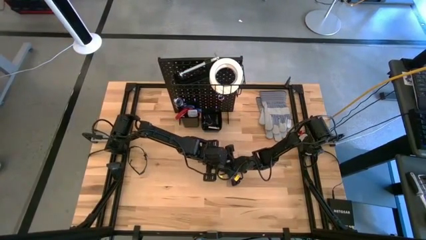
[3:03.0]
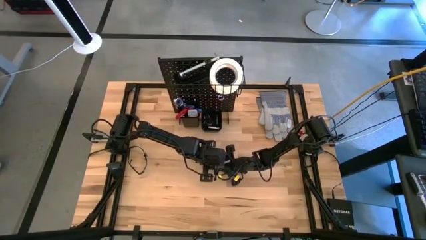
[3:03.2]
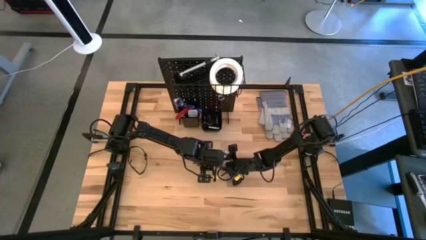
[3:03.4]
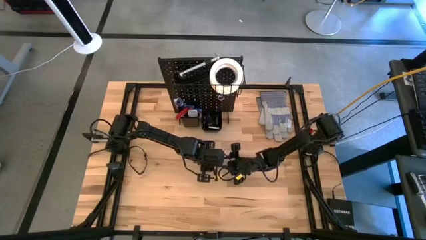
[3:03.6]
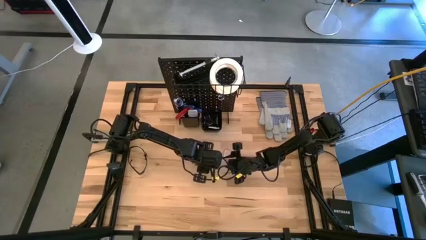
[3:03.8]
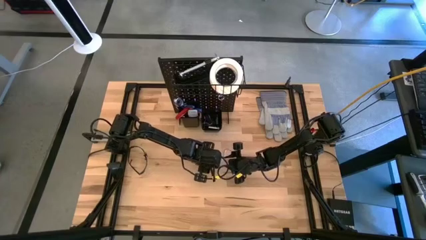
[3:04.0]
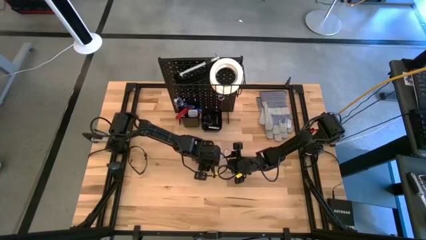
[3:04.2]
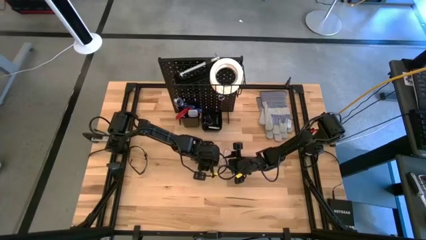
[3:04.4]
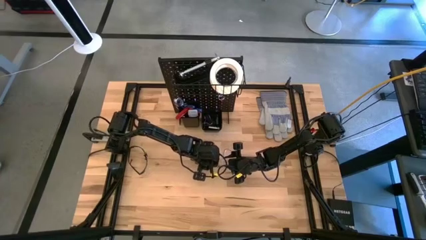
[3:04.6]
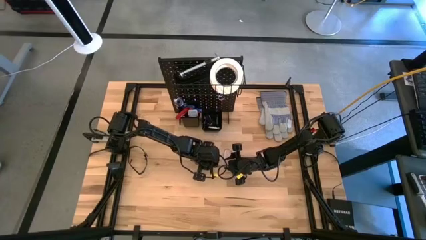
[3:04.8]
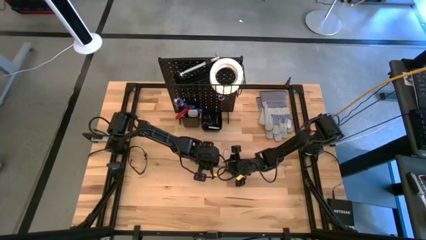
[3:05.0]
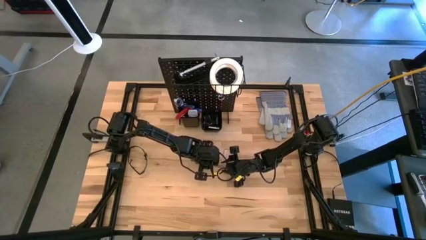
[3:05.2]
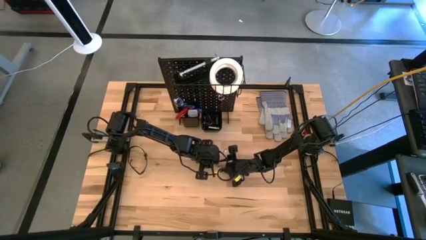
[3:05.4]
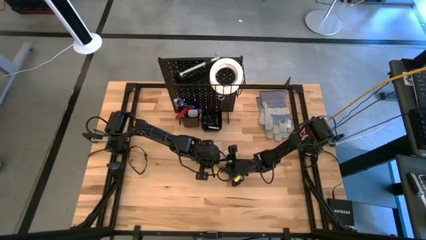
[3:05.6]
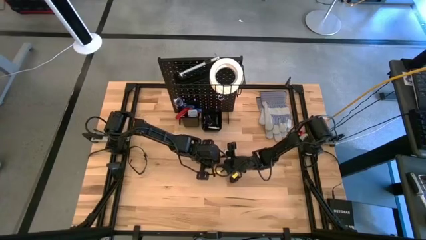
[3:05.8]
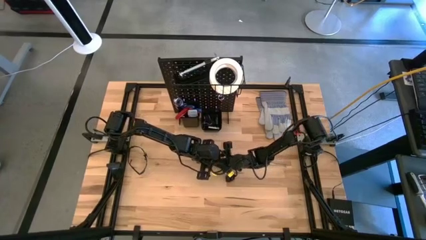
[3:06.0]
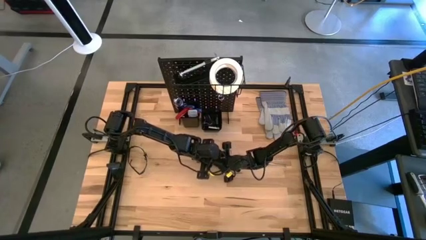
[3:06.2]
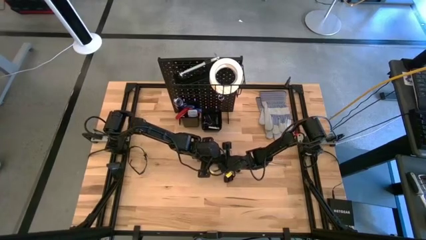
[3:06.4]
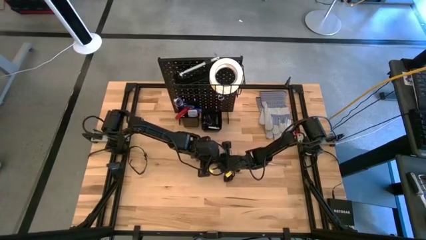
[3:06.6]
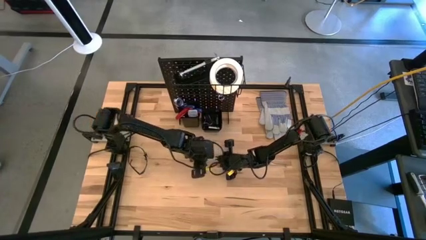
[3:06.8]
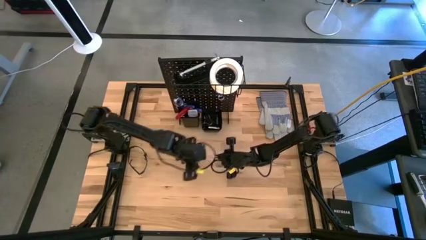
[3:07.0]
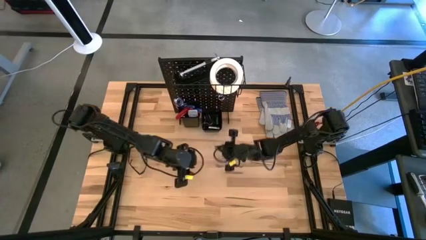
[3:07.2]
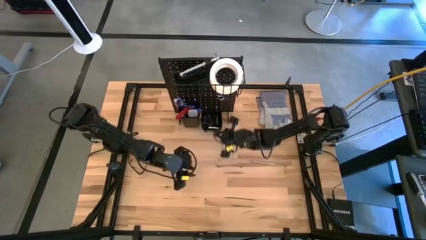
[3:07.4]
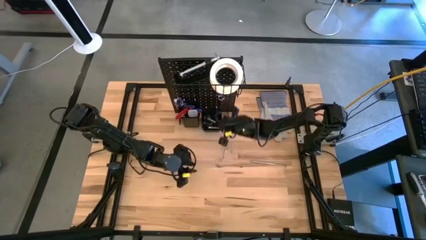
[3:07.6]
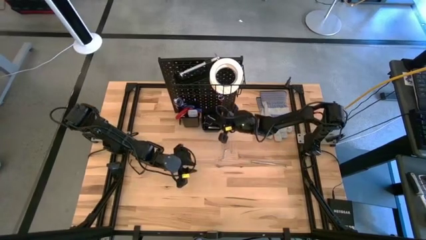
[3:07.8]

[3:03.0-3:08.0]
Task: Hang tools onto peg board
Put the pegboard hook into the right bin on the pegboard

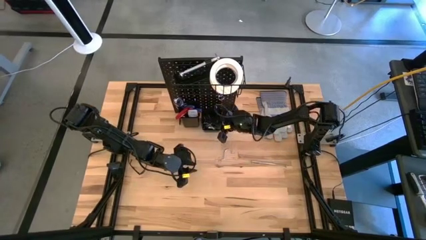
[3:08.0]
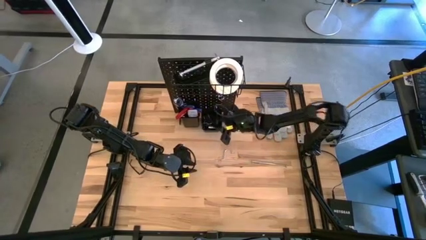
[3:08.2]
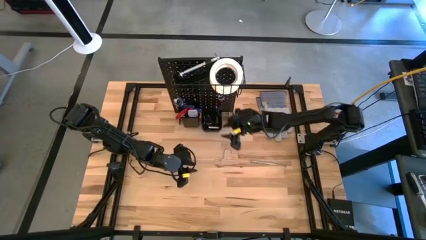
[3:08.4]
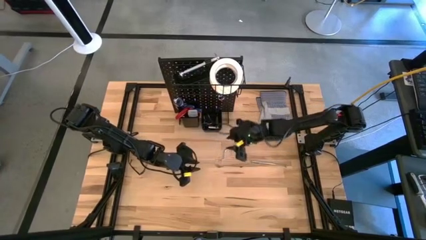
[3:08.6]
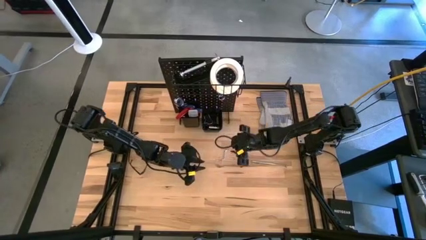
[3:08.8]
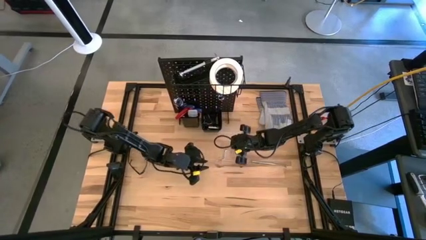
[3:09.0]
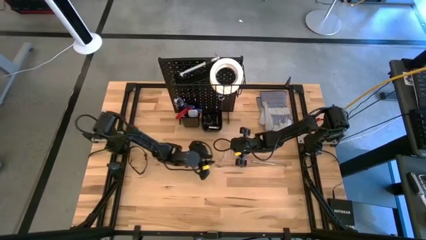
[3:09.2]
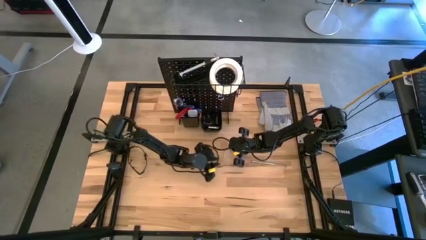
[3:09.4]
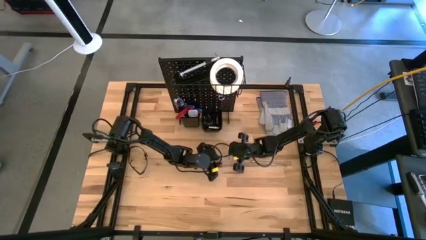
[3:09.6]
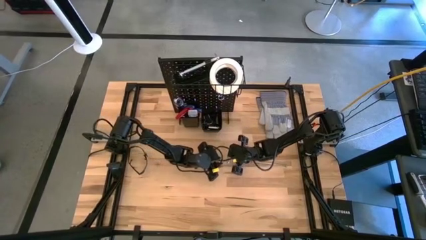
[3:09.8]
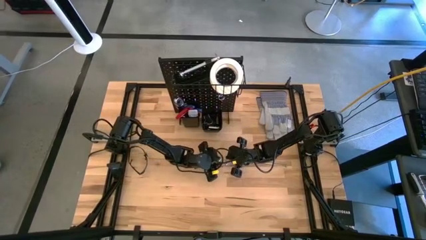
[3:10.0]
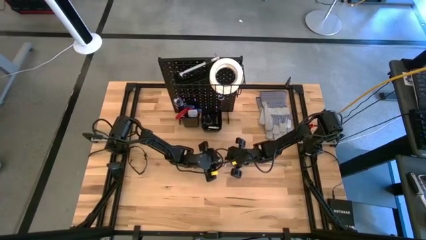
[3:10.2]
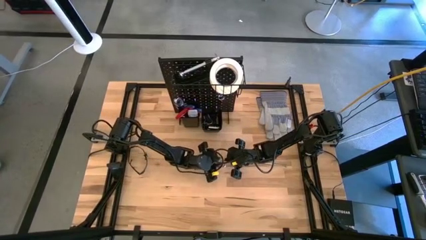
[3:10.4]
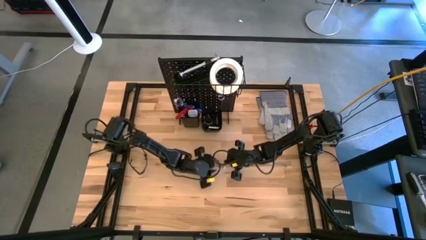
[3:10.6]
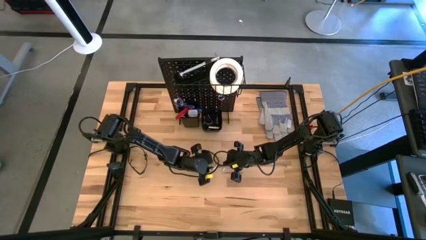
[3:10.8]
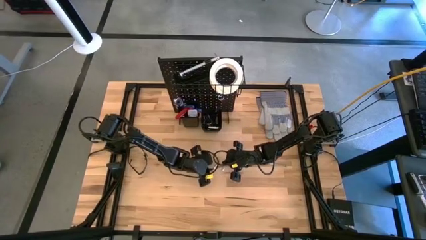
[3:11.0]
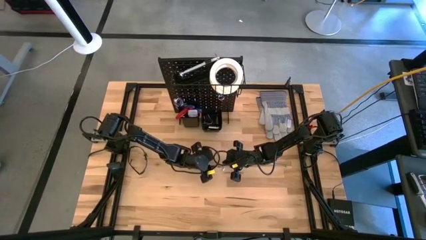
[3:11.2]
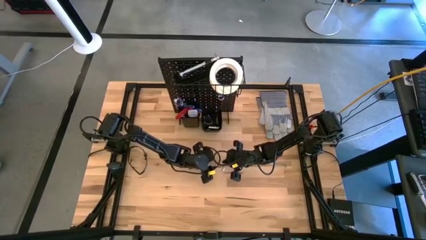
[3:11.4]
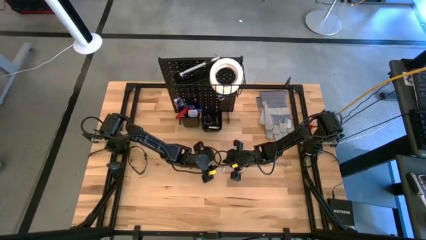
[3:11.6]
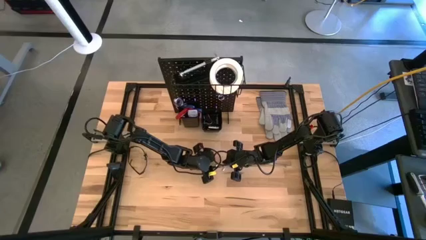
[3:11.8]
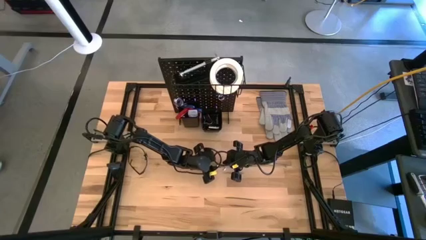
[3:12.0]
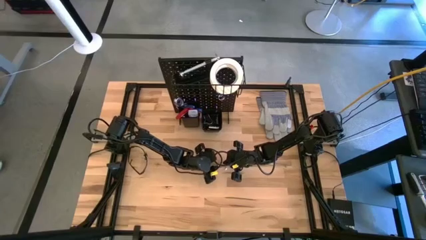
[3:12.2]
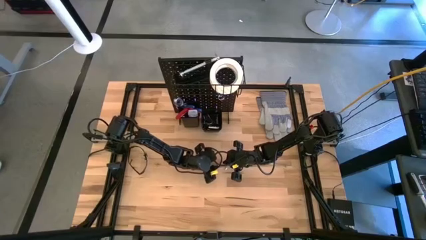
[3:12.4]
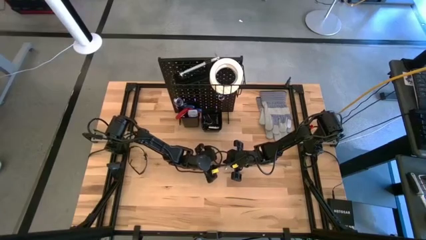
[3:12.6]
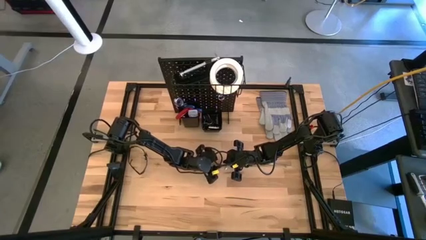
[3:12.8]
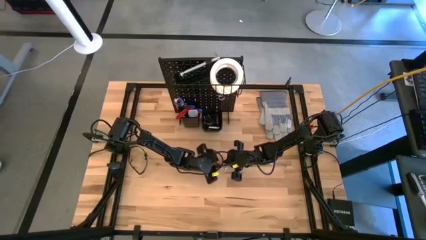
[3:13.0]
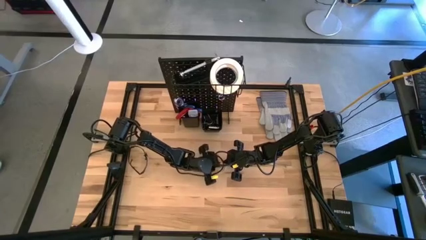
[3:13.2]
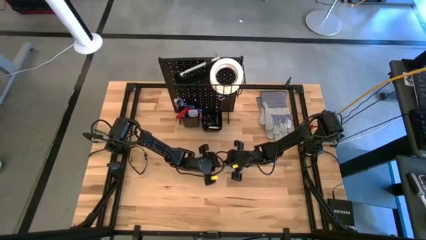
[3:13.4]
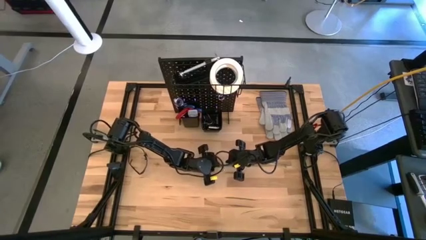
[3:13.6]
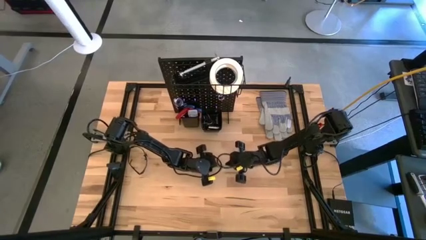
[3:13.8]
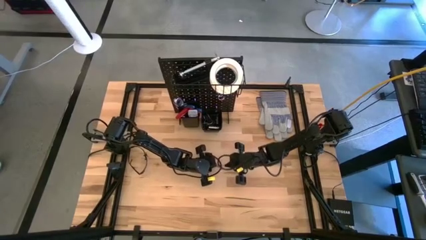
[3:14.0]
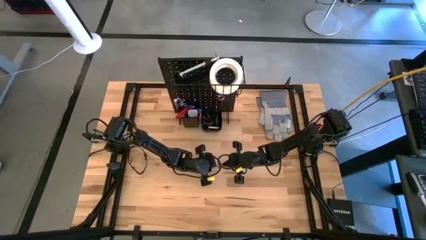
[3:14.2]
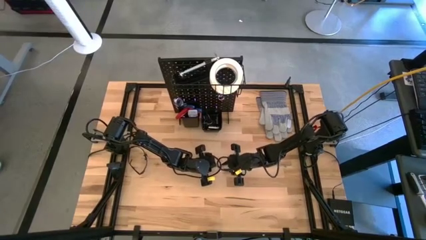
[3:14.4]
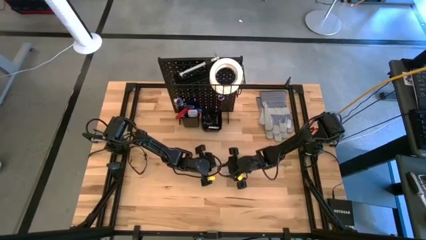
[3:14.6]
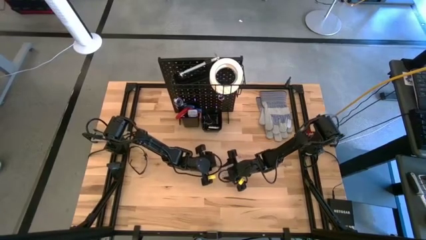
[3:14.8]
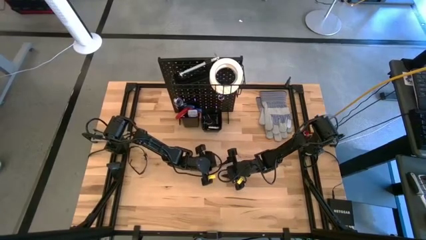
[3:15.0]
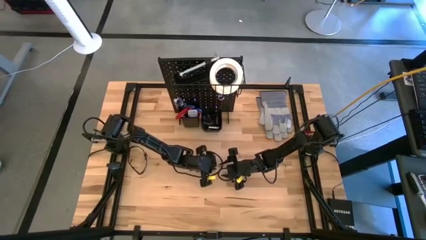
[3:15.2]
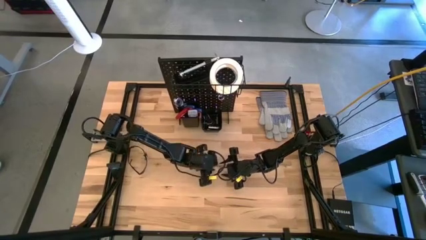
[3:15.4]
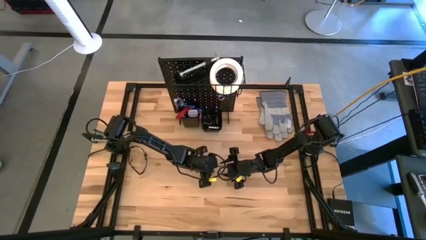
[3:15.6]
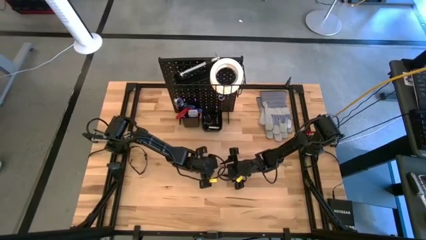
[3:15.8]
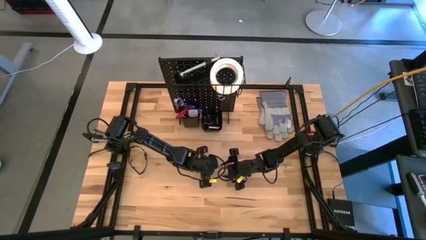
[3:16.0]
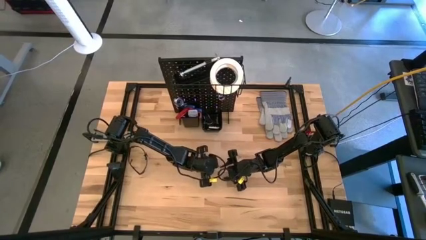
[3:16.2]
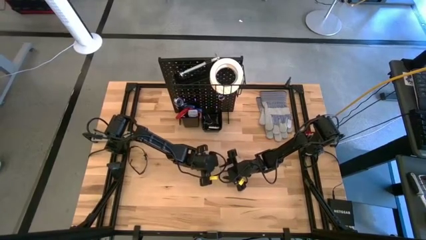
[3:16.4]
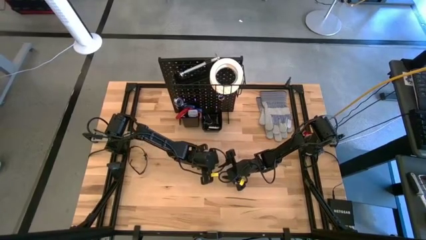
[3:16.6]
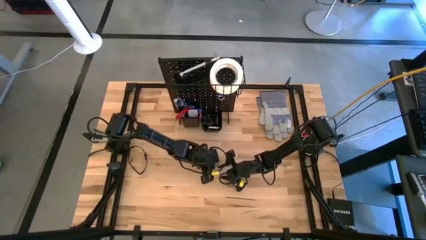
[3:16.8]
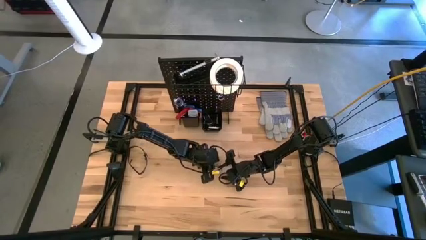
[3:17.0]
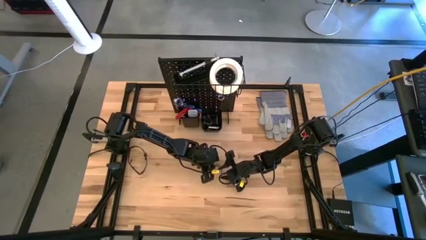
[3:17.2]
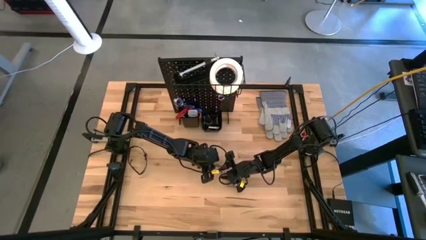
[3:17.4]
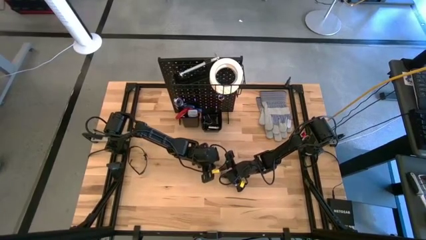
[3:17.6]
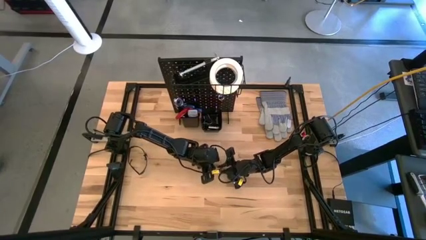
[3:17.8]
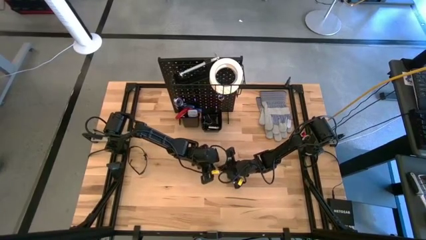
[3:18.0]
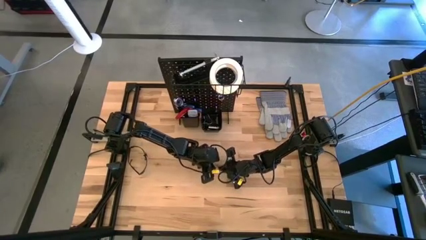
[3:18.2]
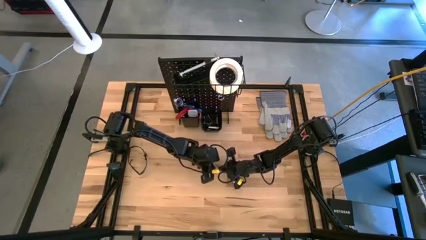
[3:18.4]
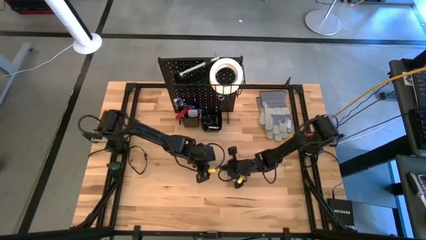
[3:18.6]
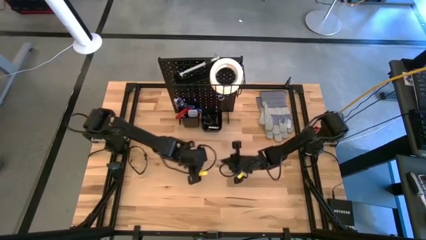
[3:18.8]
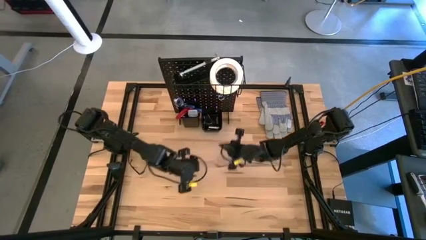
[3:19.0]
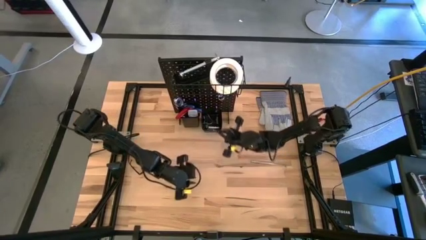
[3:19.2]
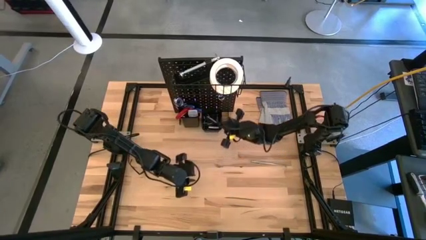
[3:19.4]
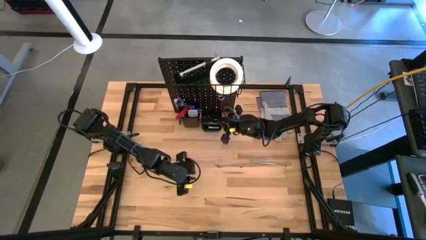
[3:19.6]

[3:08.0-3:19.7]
Put the pegboard hook into the right bin on the pegboard
